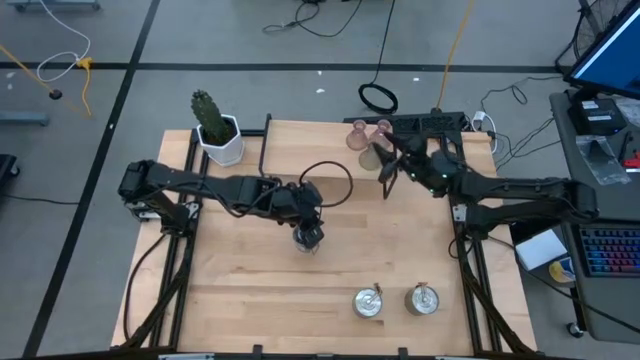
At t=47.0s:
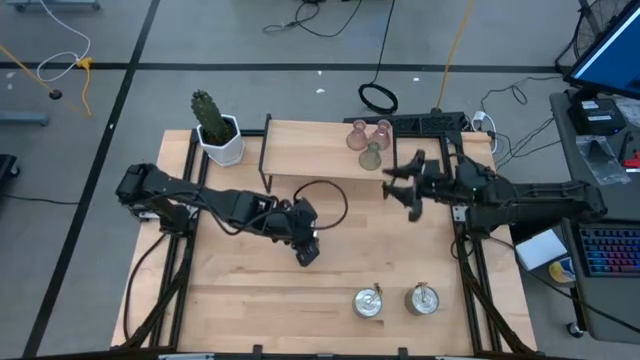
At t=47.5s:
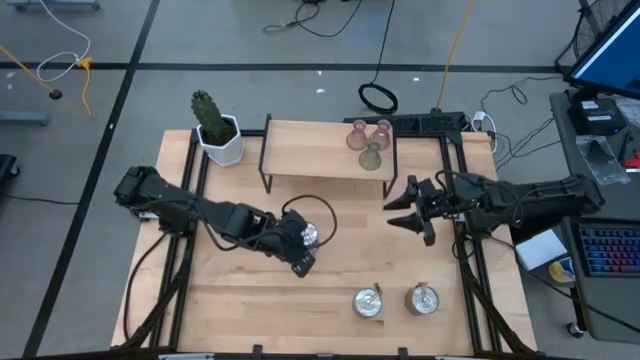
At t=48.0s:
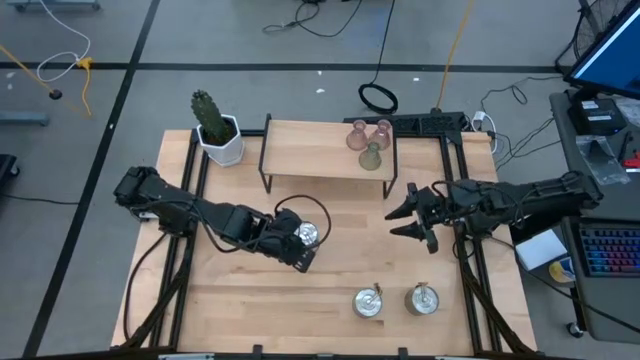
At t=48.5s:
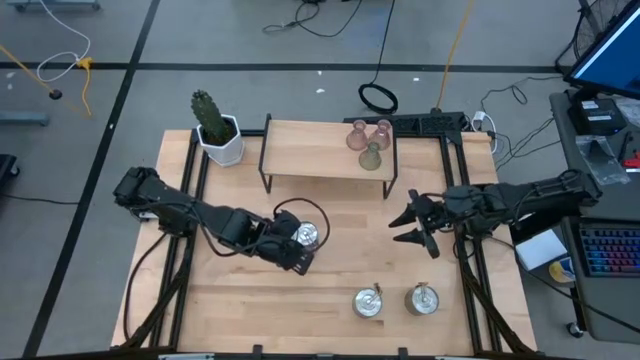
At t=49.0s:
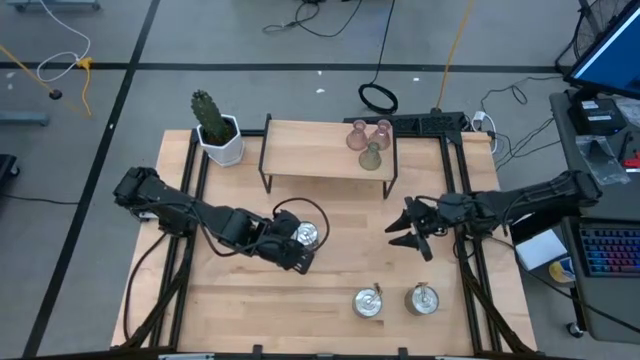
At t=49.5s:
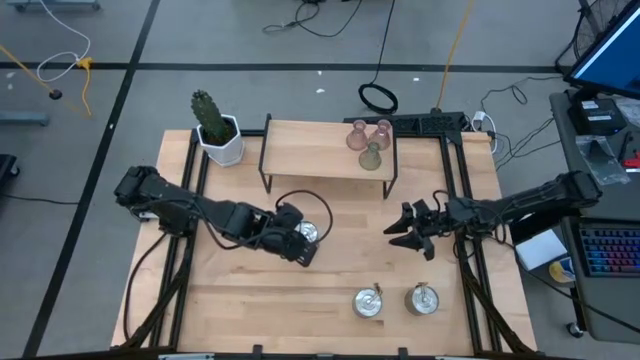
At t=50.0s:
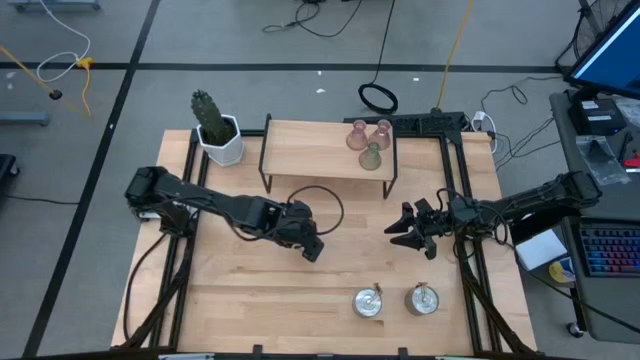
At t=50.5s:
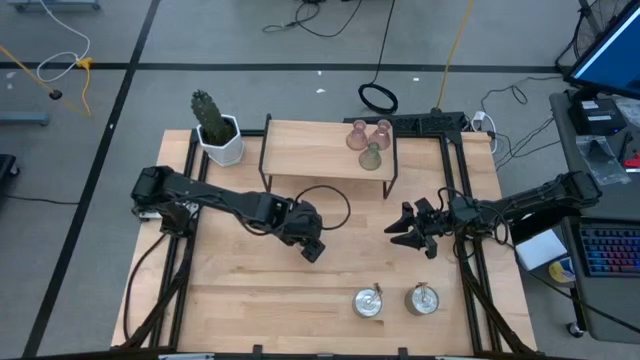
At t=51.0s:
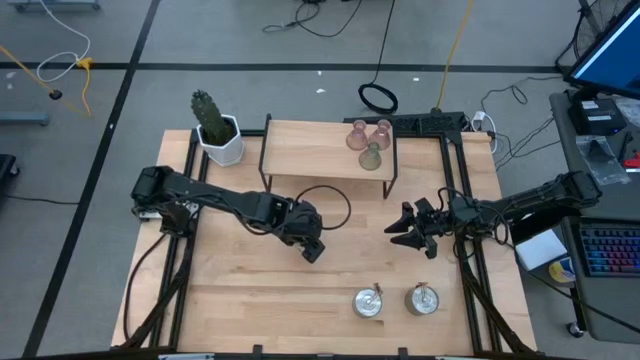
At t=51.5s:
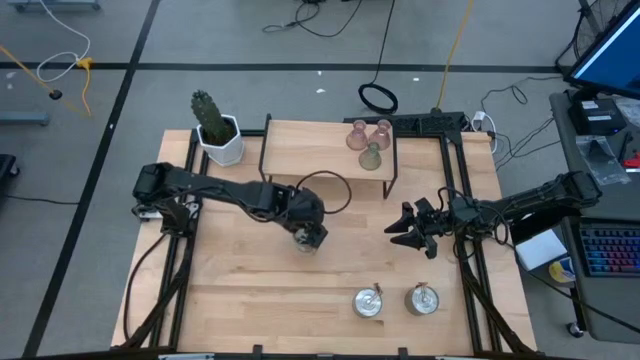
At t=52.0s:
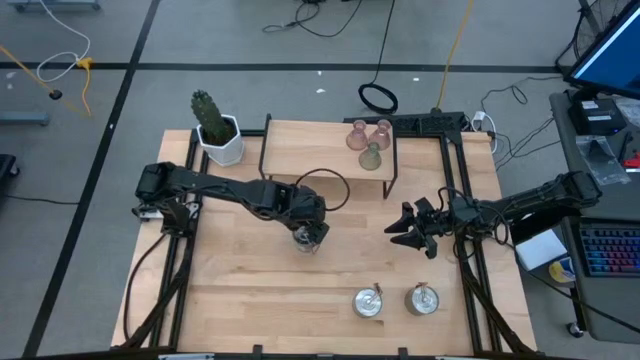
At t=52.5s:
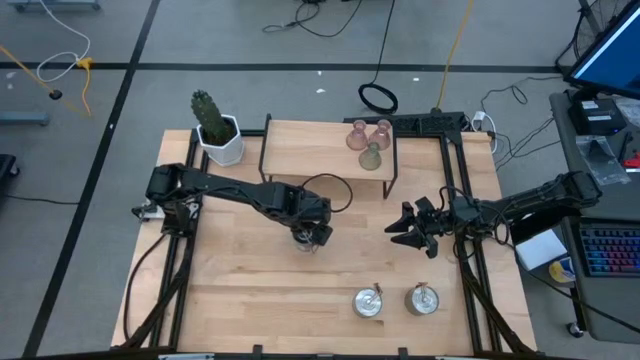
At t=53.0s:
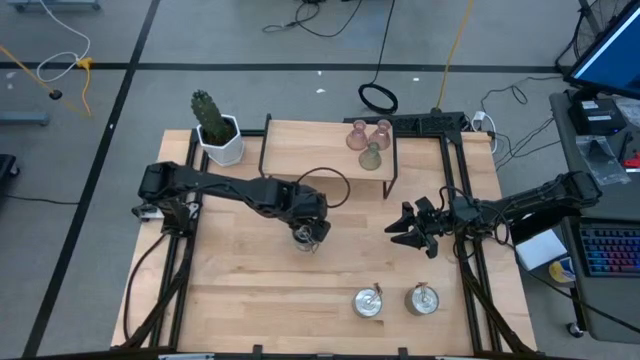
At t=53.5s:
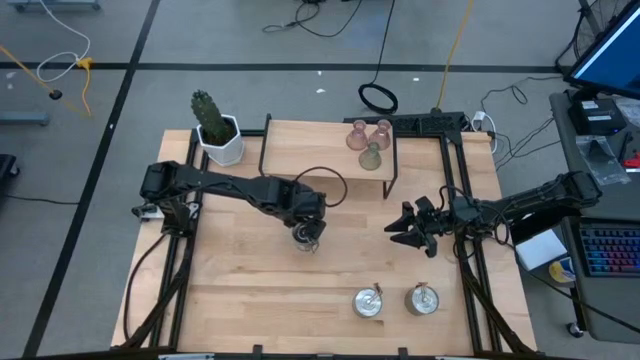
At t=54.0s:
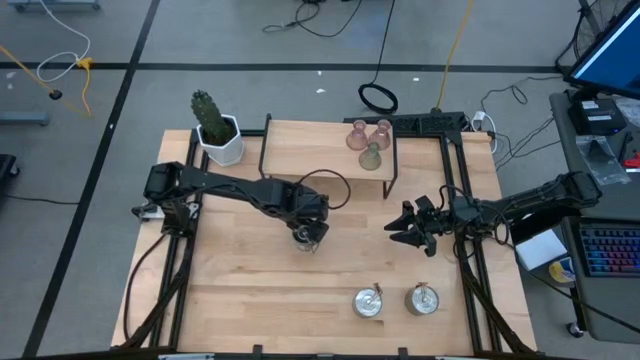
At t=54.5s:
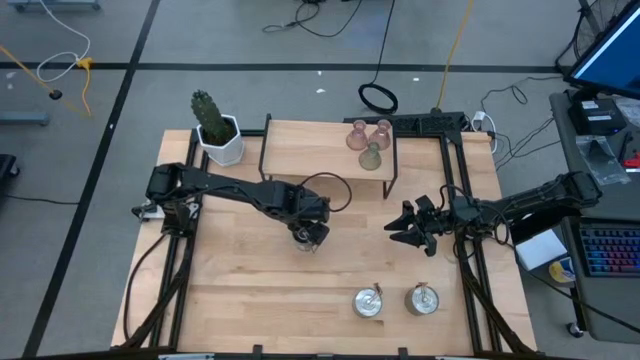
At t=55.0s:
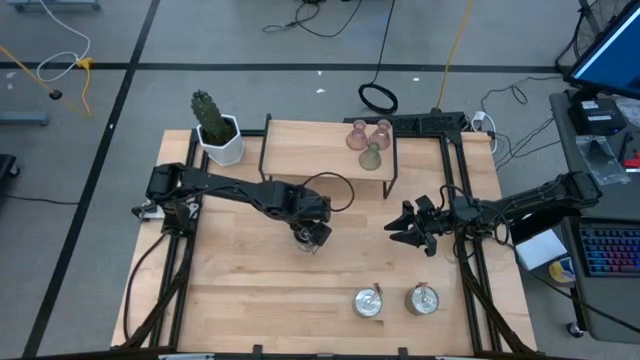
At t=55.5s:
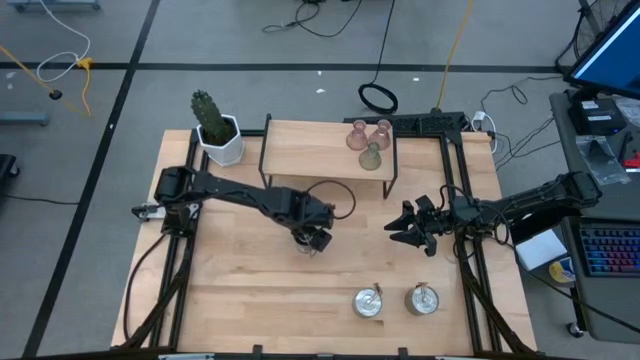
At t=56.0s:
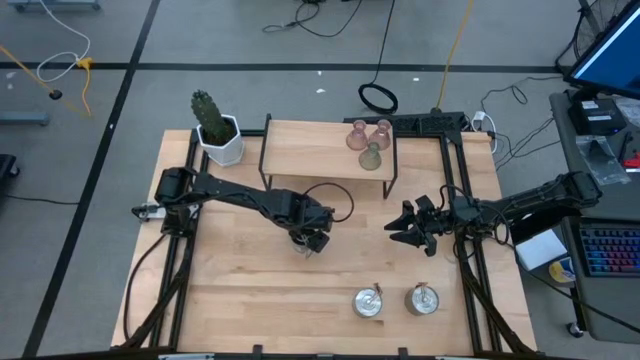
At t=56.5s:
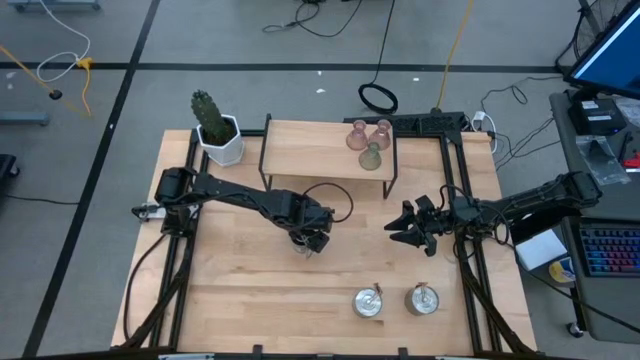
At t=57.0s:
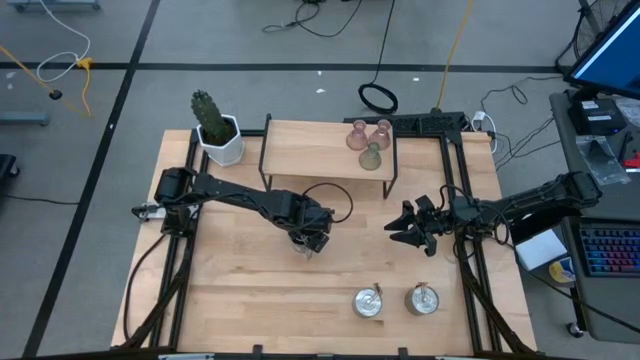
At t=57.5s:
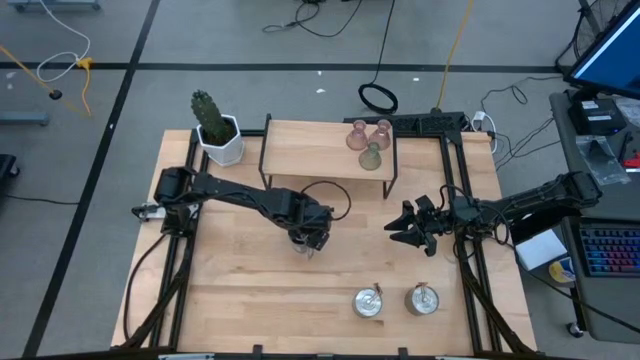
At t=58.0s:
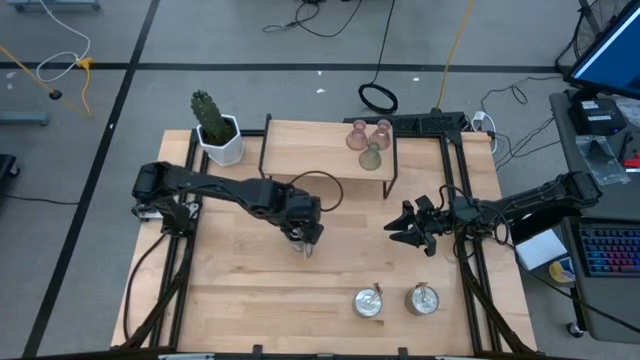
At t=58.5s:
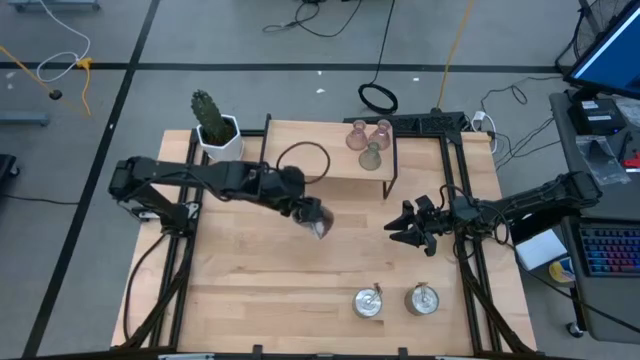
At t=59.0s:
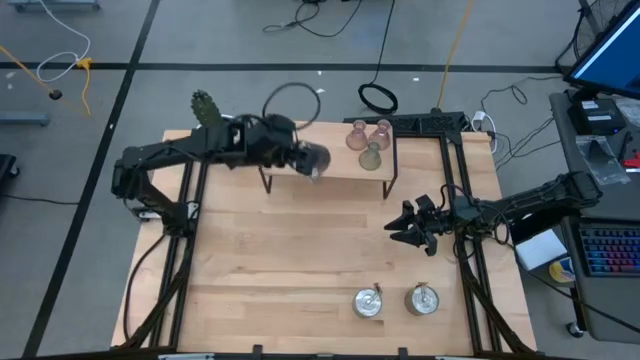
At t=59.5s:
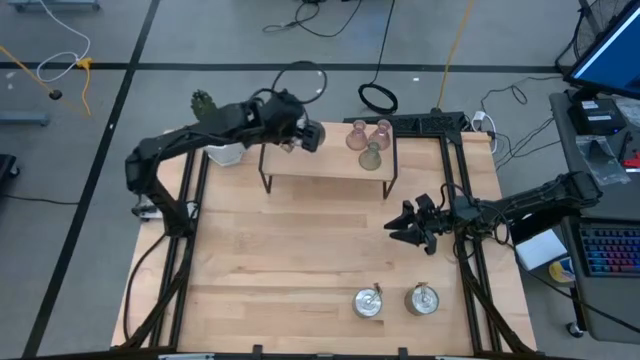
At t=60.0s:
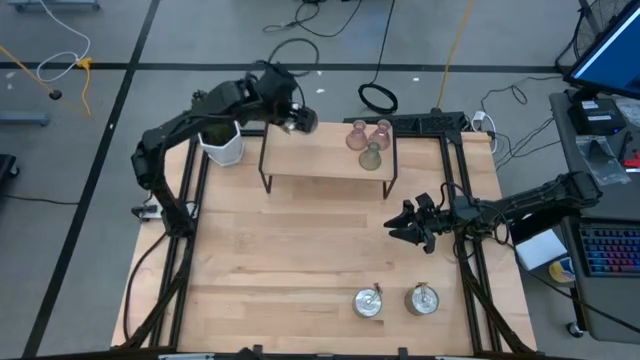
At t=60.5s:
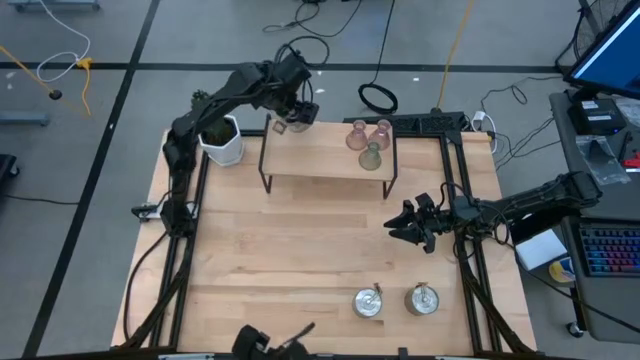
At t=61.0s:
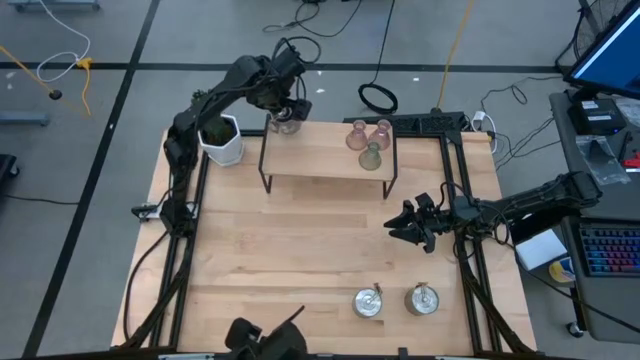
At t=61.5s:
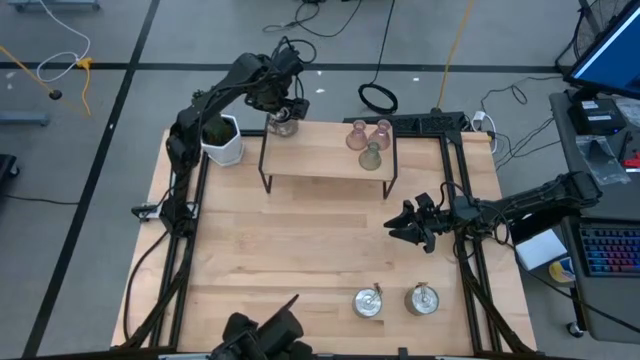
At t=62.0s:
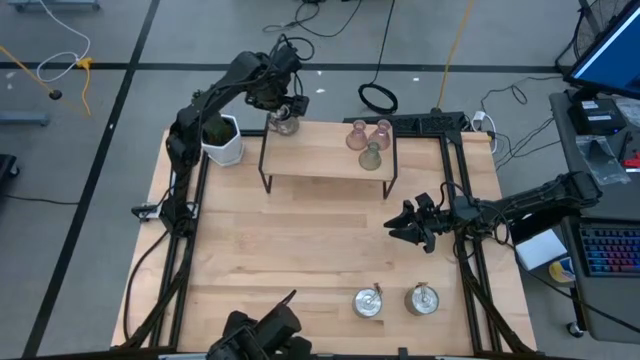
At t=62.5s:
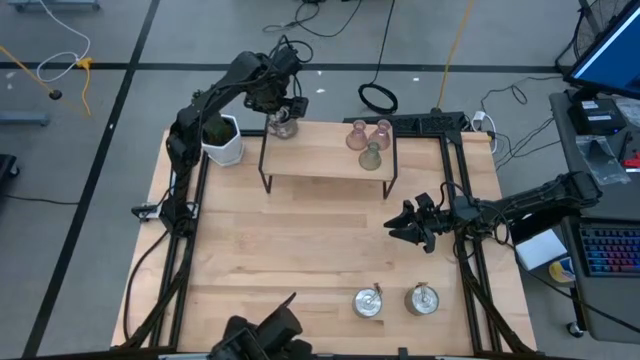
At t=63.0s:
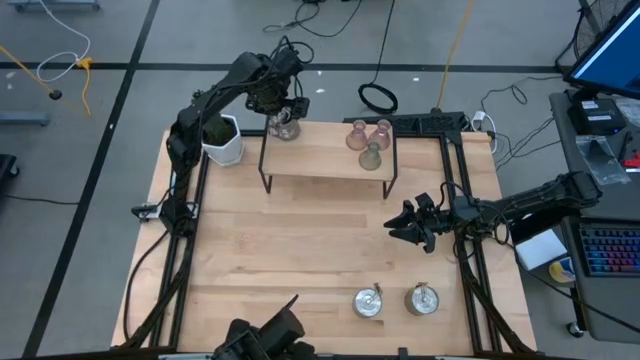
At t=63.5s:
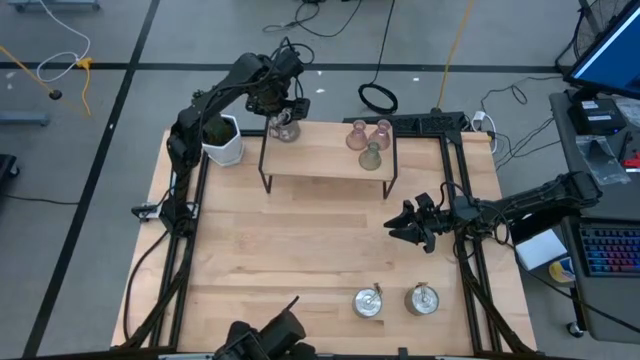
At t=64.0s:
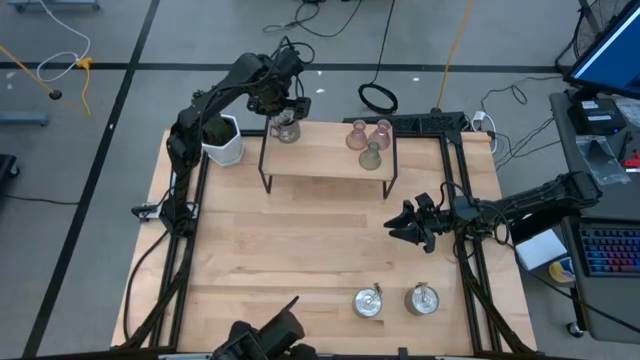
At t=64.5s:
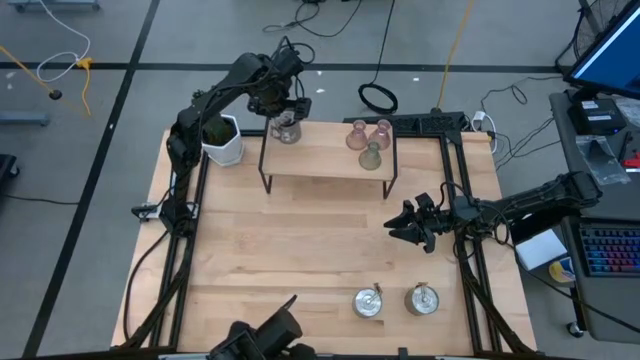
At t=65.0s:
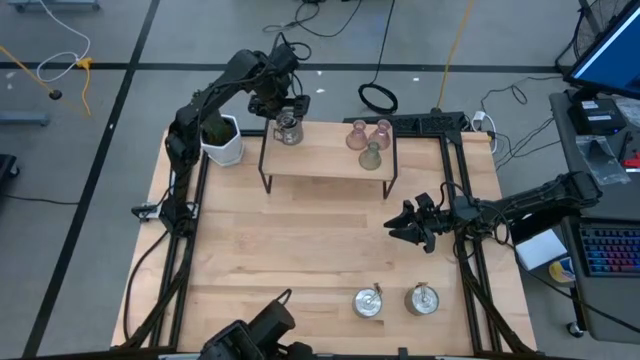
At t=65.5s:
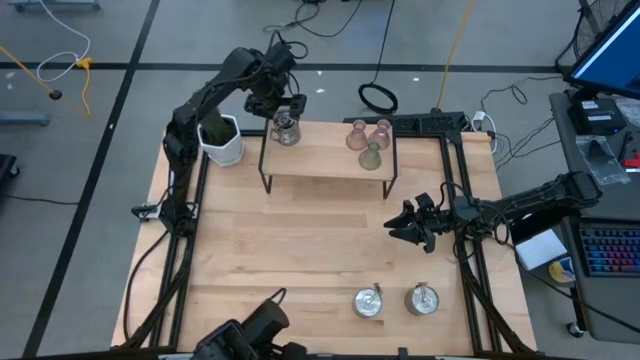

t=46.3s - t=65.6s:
Task: Pick & Place candle stick holders
Put the top silver scented candle on the shelf

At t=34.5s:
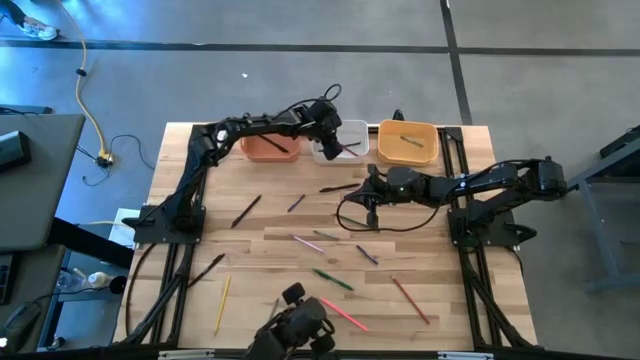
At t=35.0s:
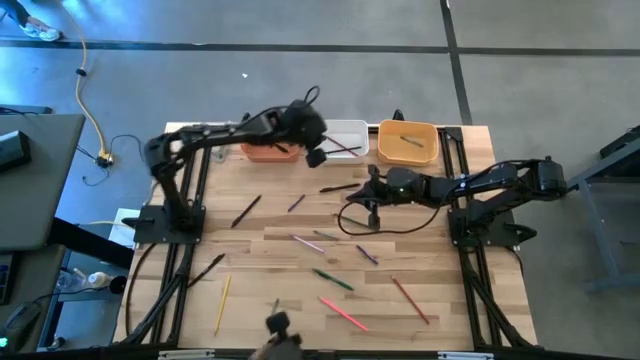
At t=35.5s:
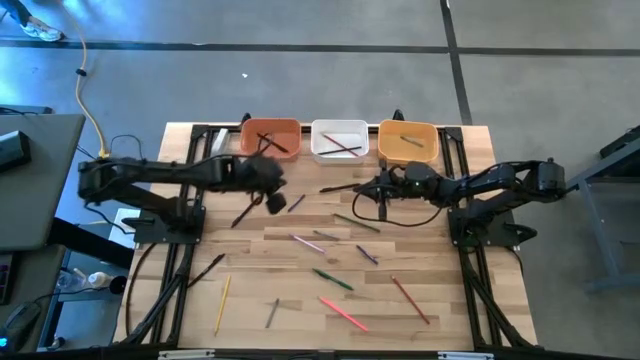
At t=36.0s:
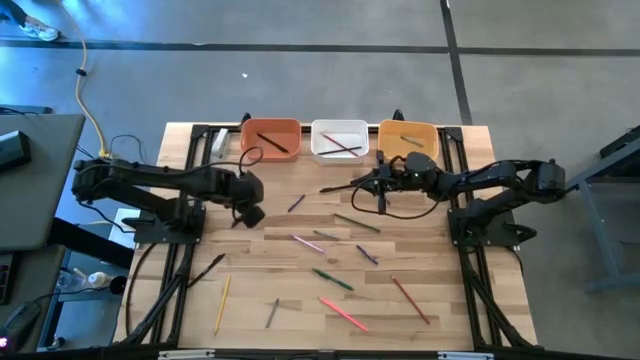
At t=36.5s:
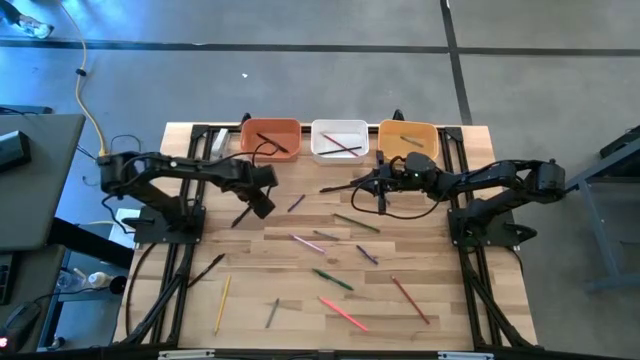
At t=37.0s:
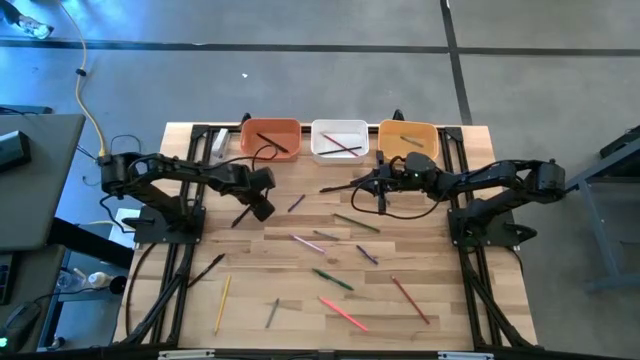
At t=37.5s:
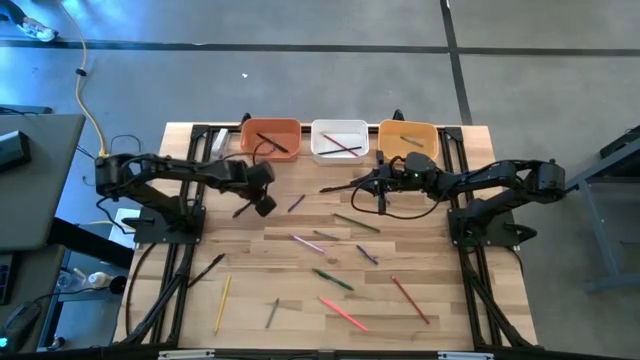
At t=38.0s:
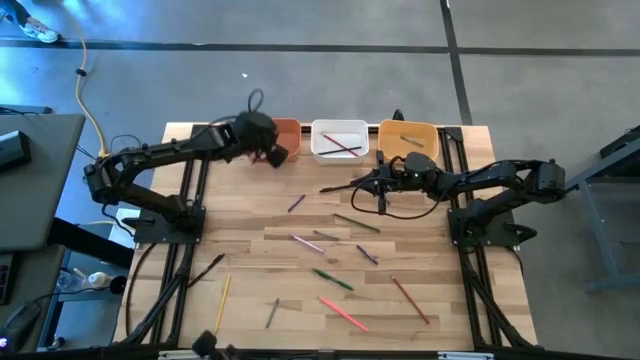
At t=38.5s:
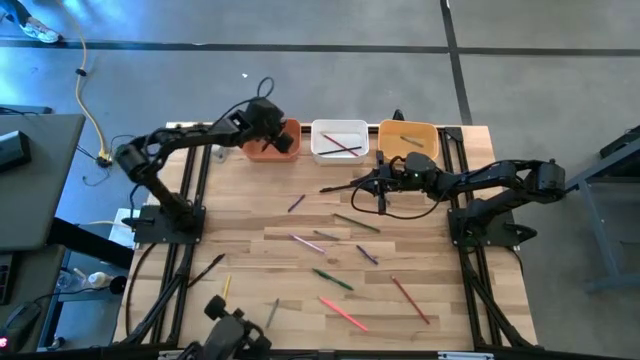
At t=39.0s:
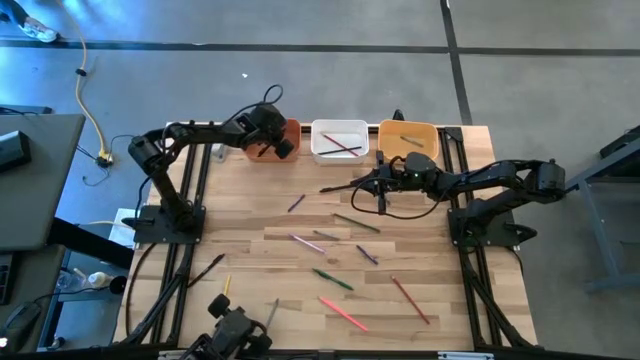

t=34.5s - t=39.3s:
Task: Sort crayons/erasers/pens/pencils in bins
Put the middle left black pen into the orange bin
